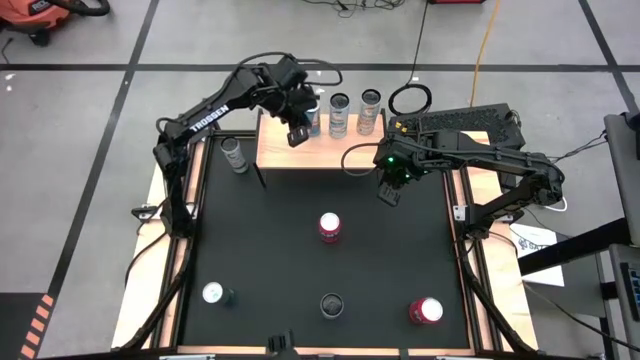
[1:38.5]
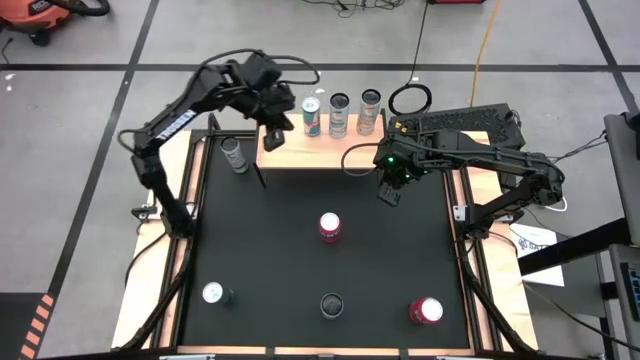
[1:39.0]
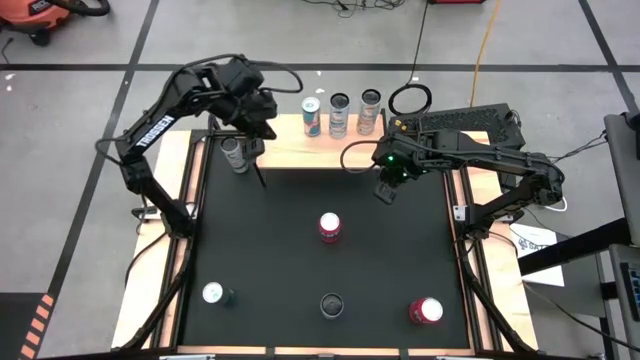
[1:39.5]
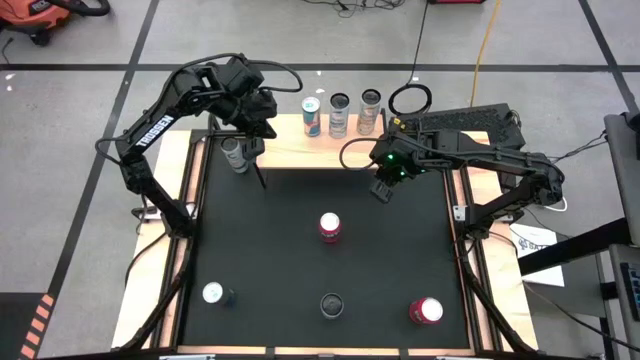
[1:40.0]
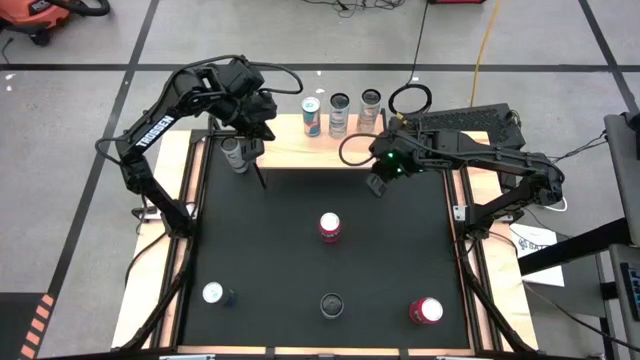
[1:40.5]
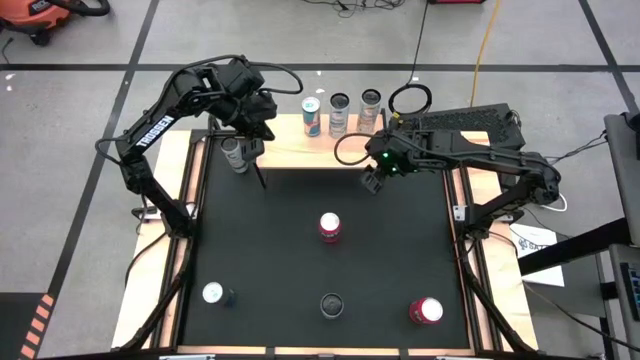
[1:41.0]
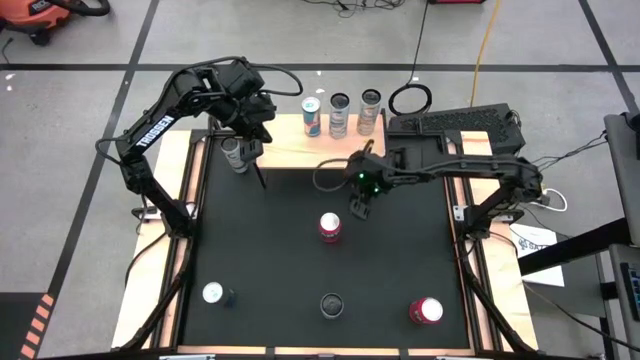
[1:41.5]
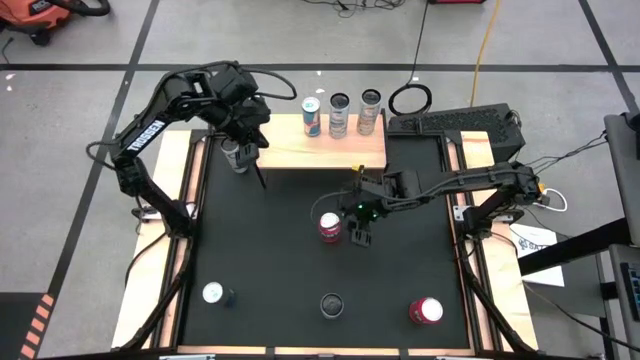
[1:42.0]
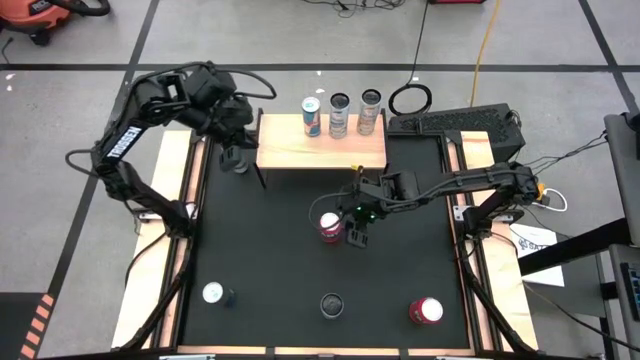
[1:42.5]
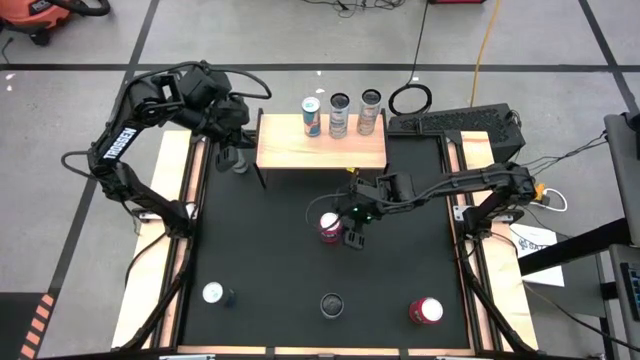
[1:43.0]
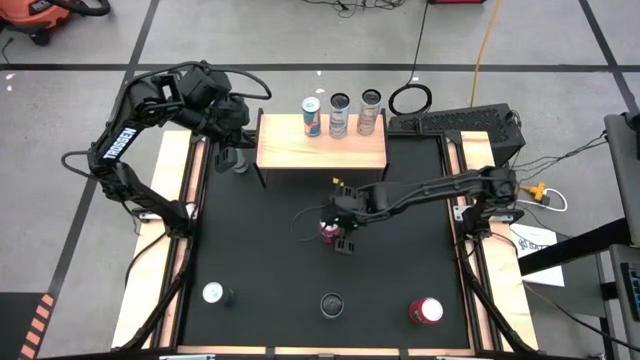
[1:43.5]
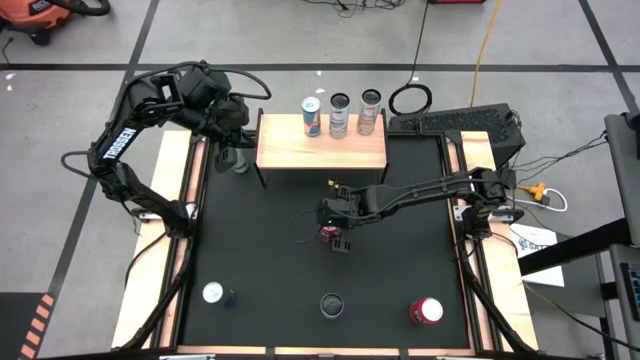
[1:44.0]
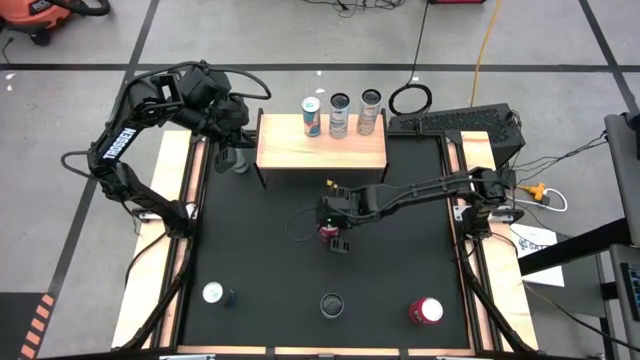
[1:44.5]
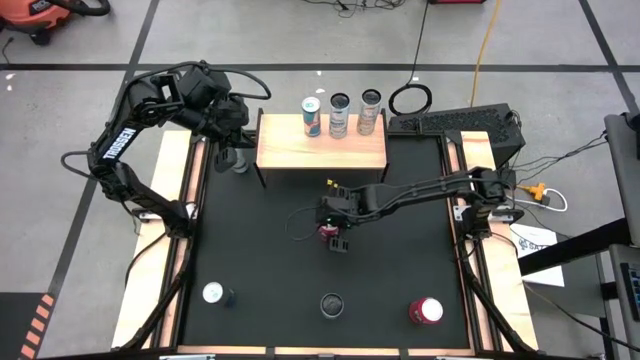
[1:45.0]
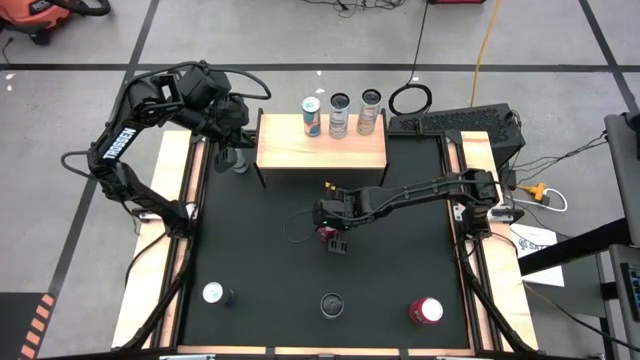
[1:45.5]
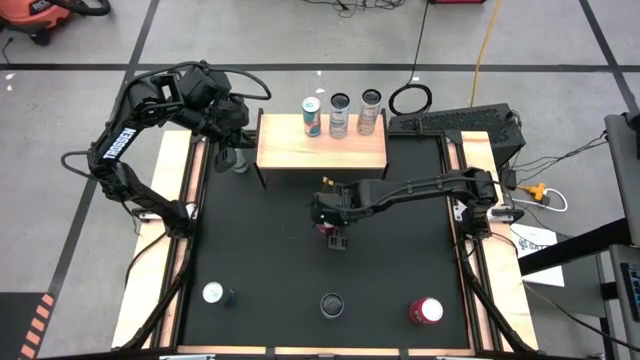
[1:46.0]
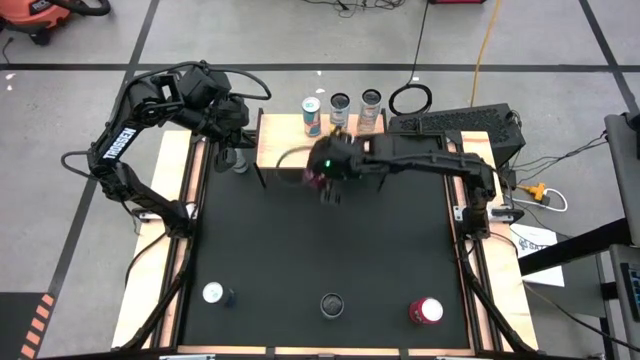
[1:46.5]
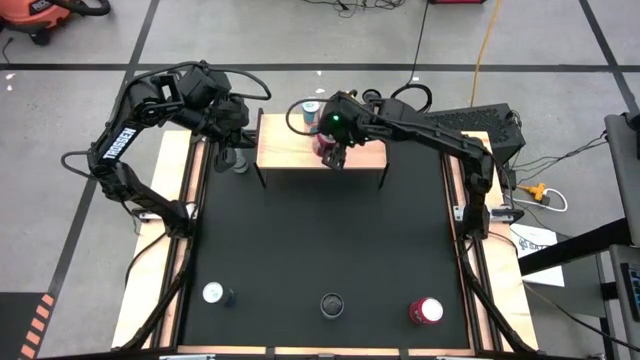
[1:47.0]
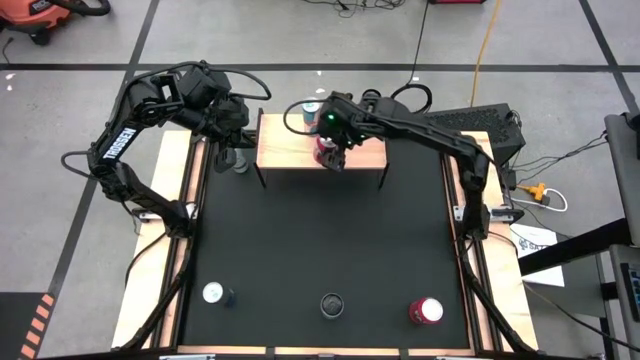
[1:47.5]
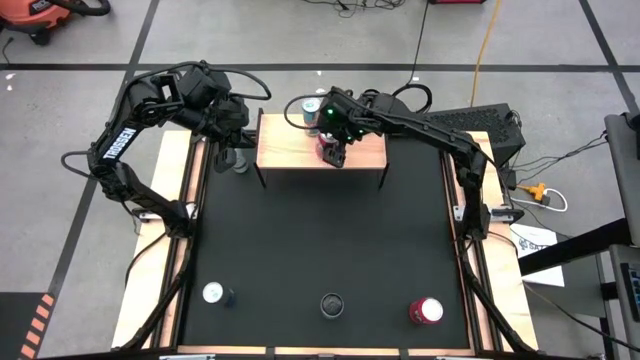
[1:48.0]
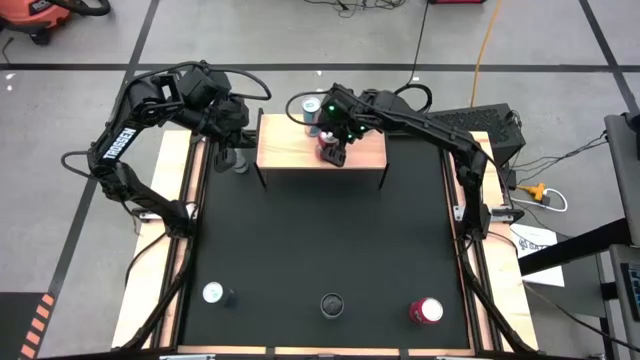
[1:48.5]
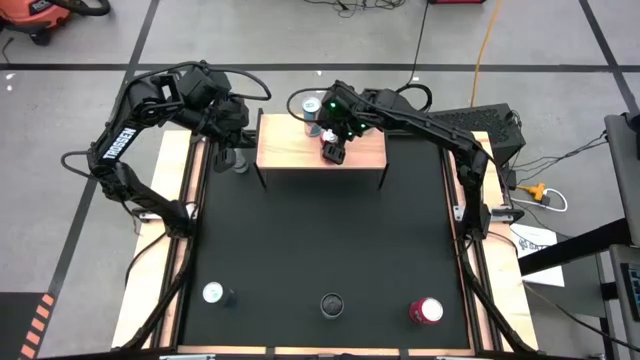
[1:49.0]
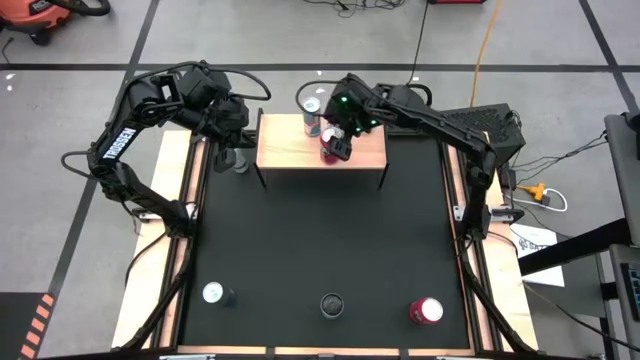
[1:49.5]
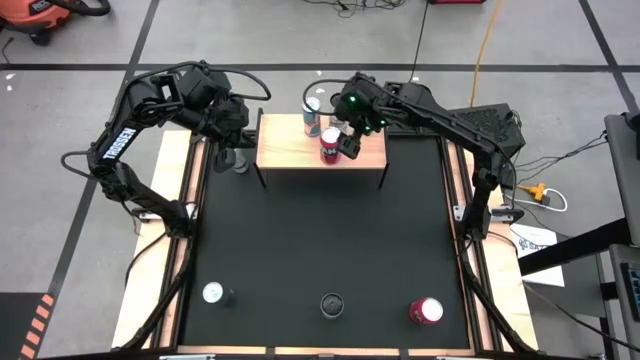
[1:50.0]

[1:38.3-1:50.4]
Task: Place canned beverage on shelf
Put the top red soda can on the shelf

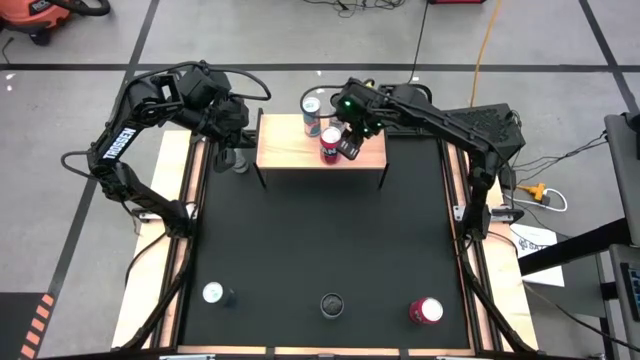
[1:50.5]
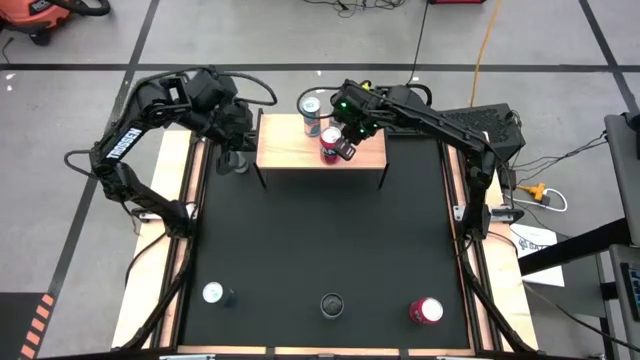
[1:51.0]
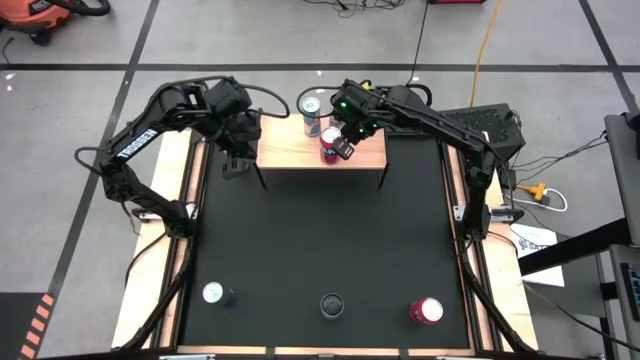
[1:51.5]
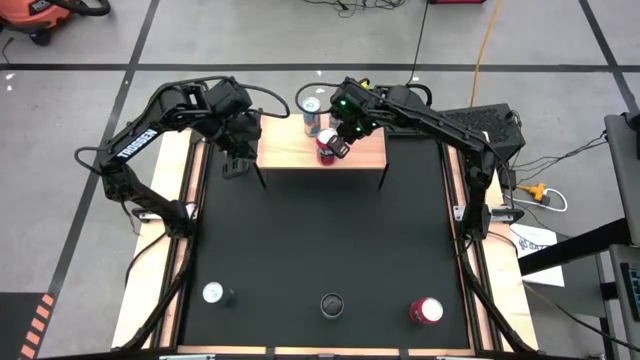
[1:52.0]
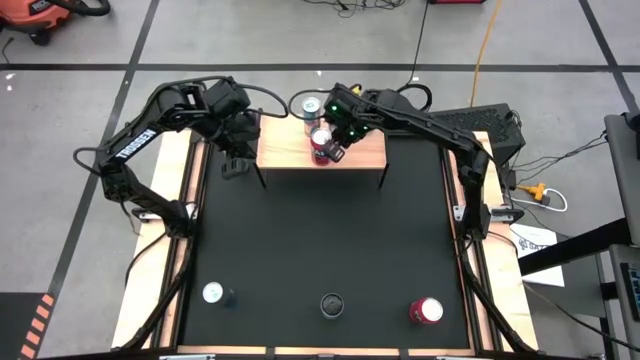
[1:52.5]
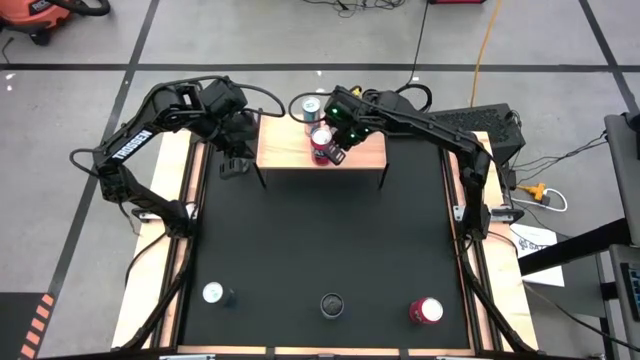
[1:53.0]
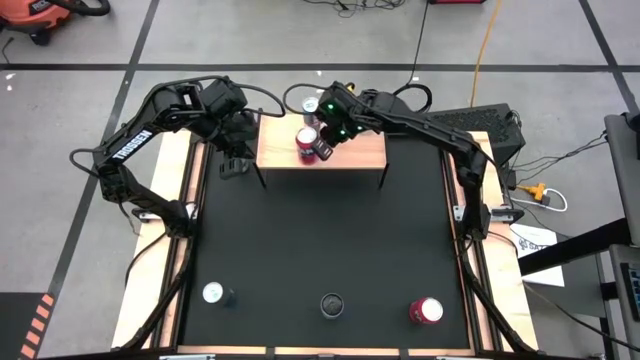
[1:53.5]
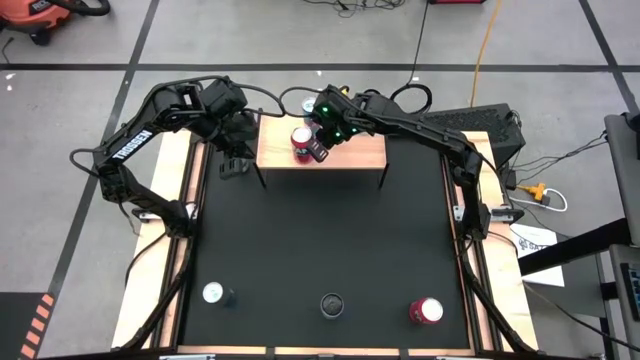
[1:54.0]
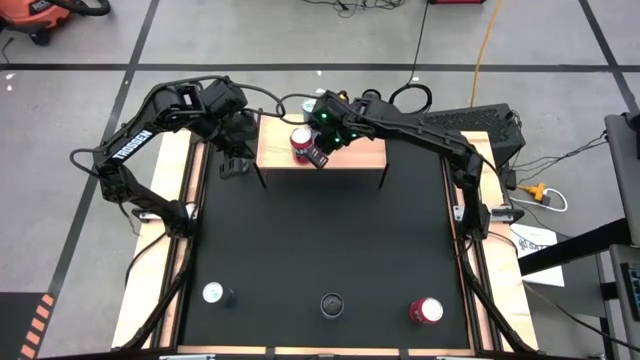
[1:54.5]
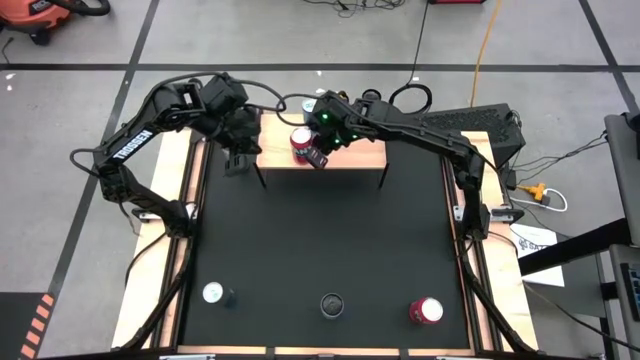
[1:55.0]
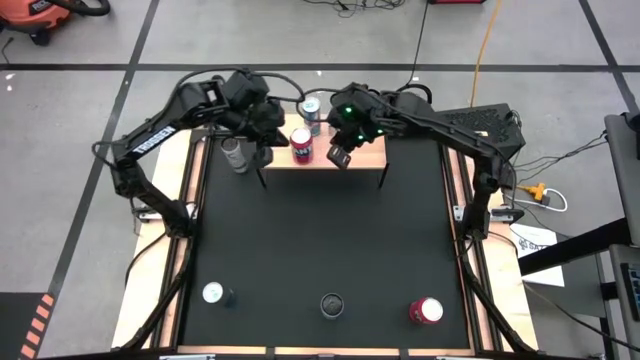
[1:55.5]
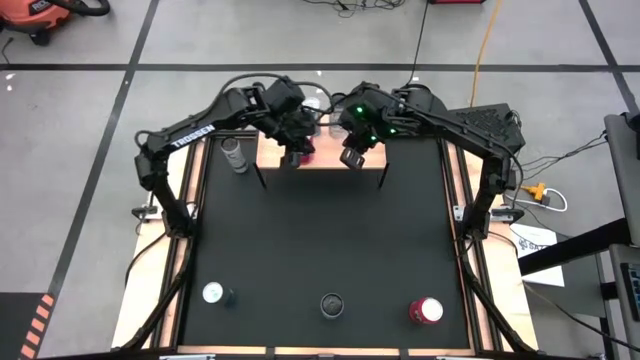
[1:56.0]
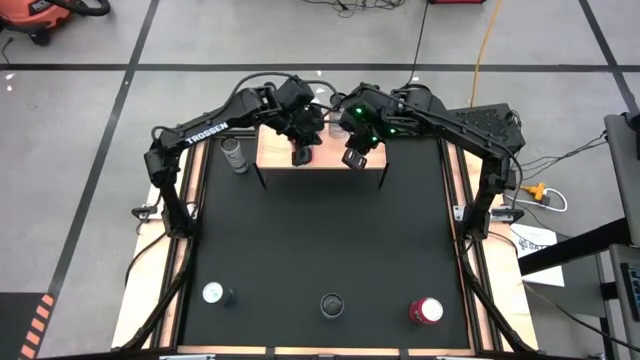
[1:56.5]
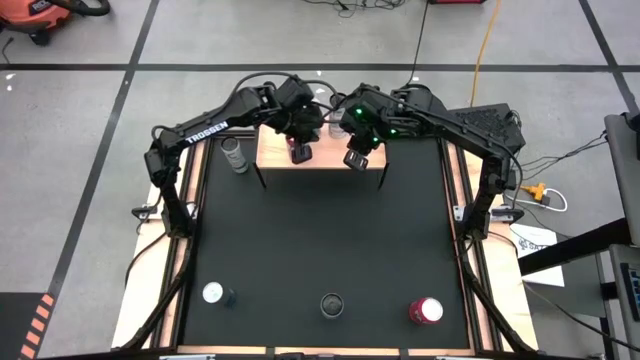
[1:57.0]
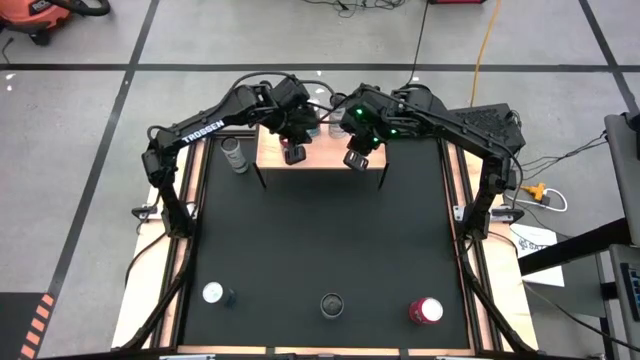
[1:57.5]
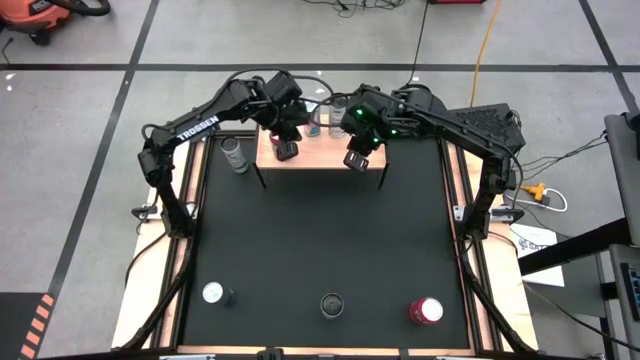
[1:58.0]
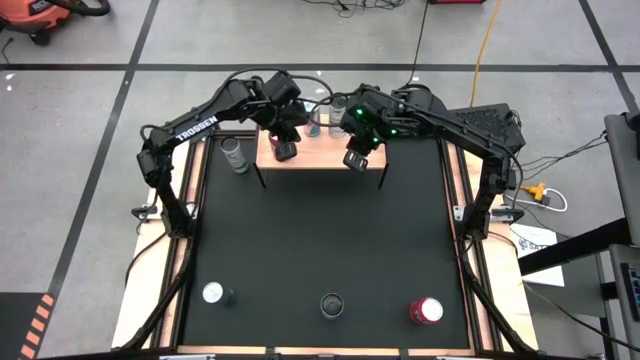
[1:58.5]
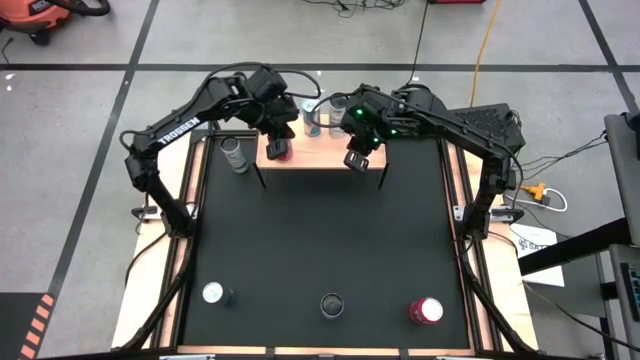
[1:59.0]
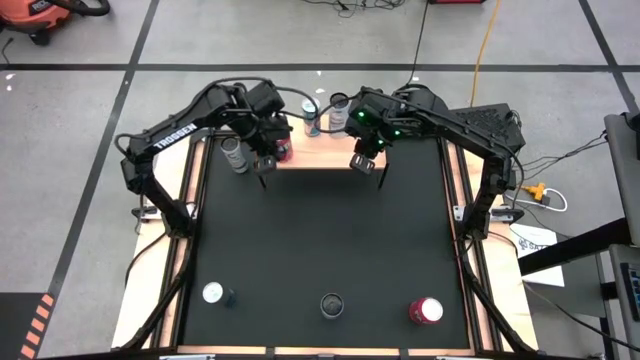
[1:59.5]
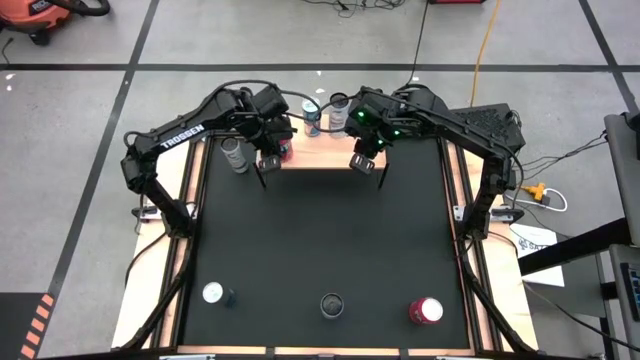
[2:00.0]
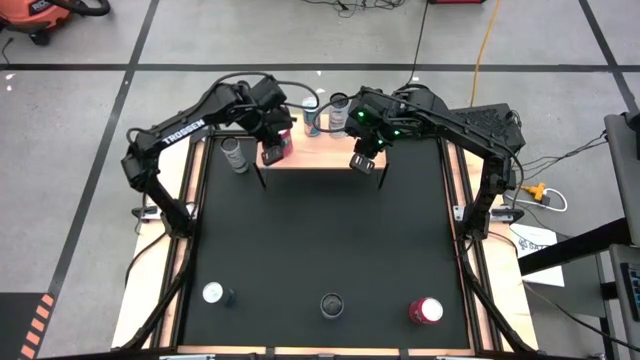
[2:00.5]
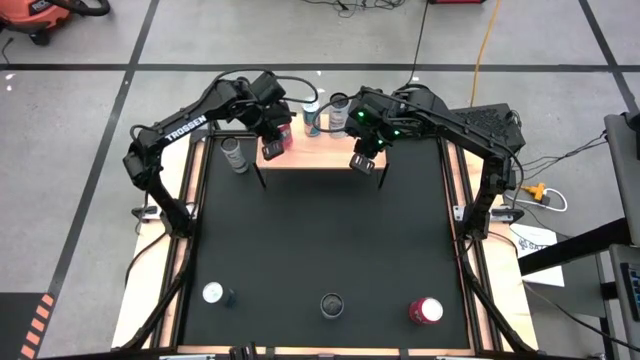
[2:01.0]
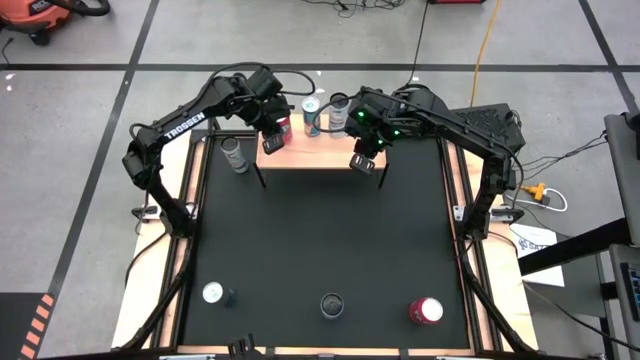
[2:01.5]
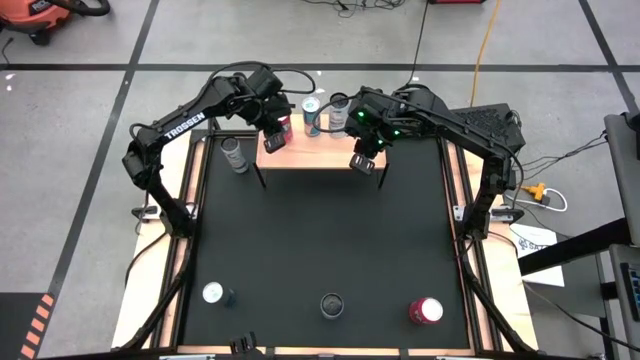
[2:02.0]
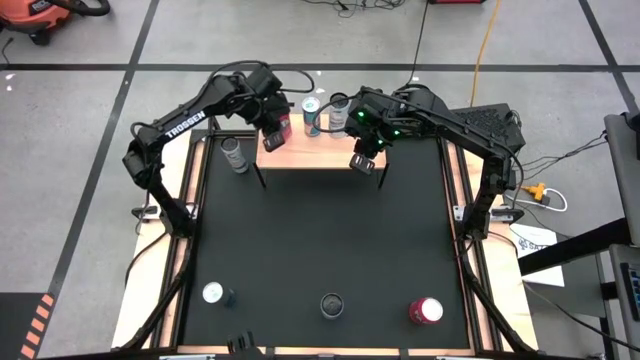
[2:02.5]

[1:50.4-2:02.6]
Put the top red soda can on the shelf
